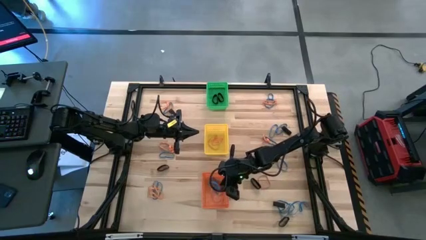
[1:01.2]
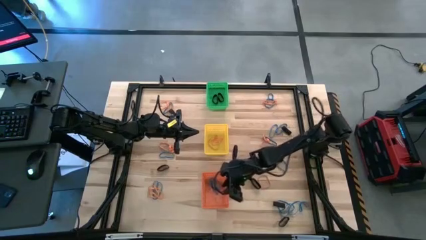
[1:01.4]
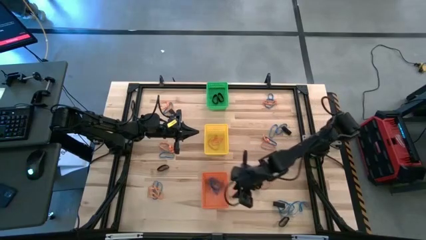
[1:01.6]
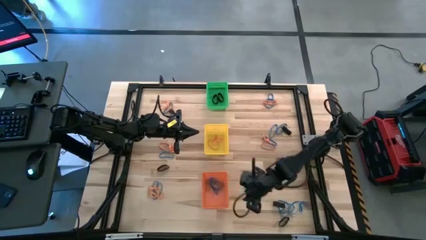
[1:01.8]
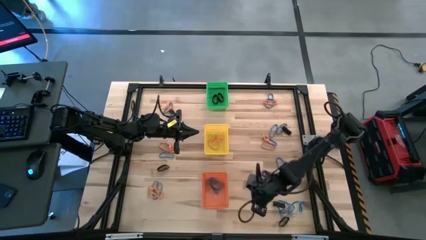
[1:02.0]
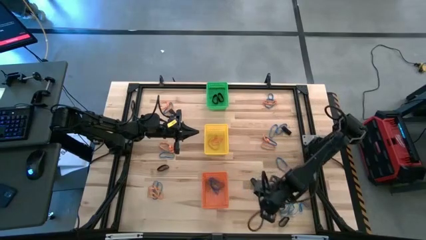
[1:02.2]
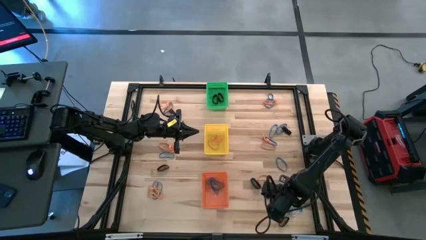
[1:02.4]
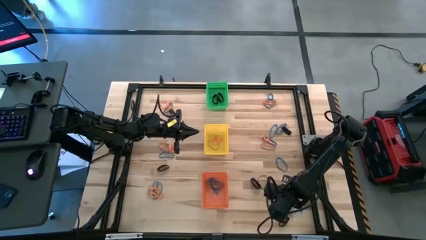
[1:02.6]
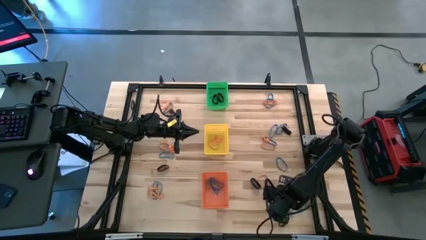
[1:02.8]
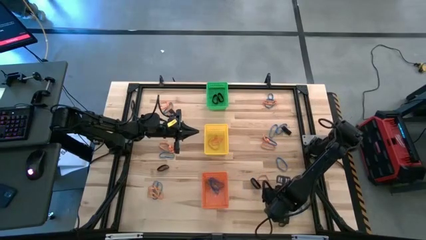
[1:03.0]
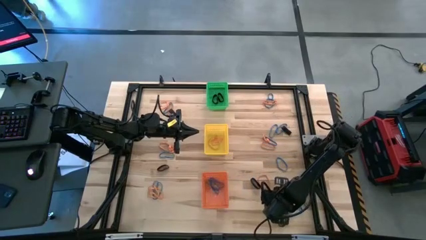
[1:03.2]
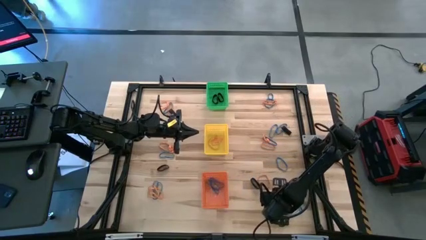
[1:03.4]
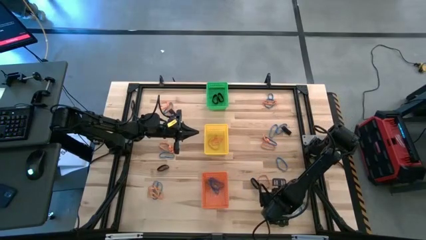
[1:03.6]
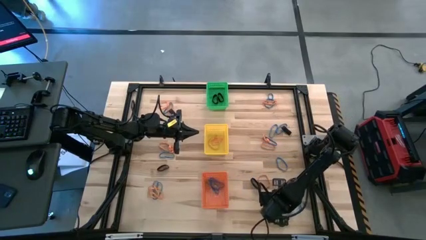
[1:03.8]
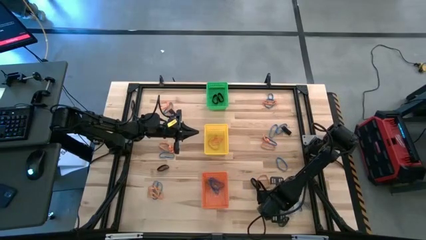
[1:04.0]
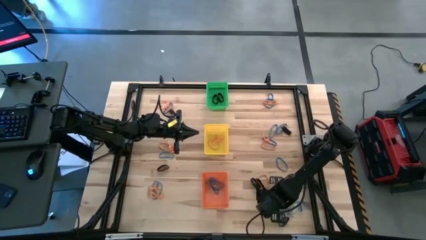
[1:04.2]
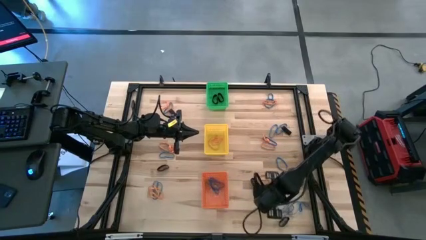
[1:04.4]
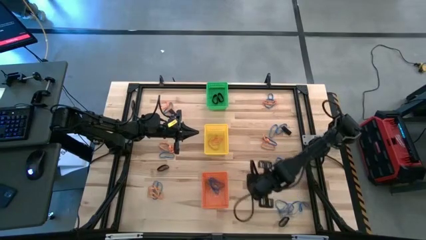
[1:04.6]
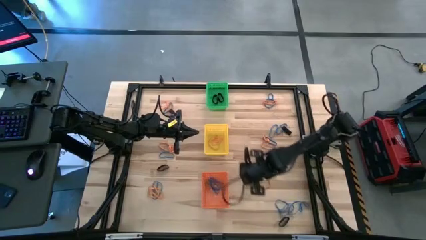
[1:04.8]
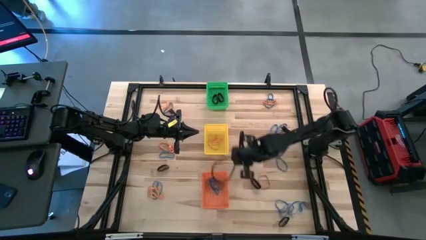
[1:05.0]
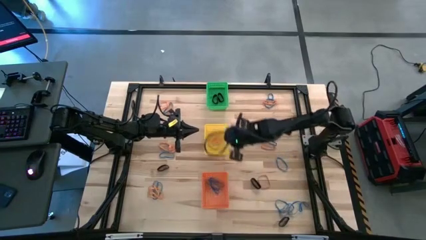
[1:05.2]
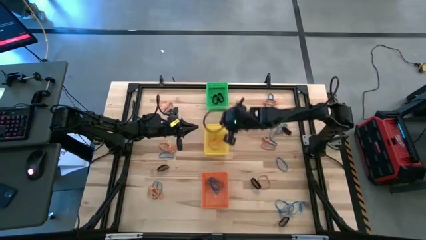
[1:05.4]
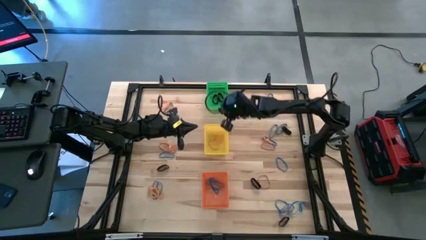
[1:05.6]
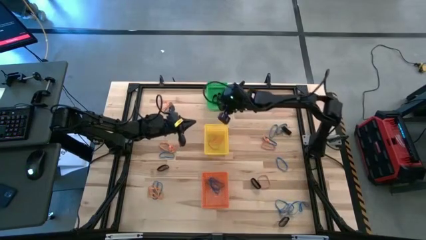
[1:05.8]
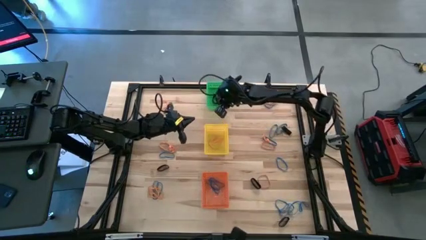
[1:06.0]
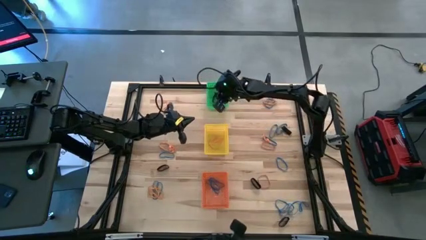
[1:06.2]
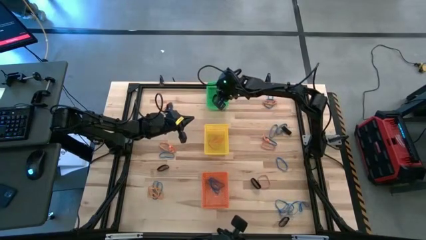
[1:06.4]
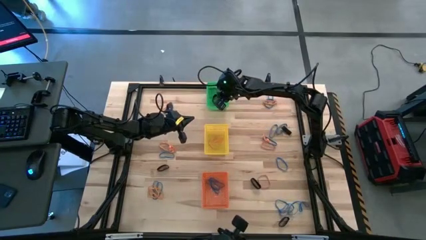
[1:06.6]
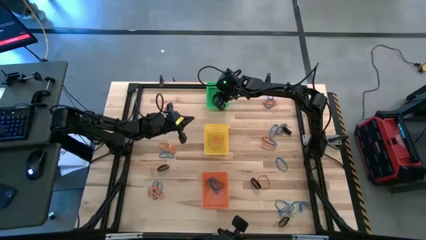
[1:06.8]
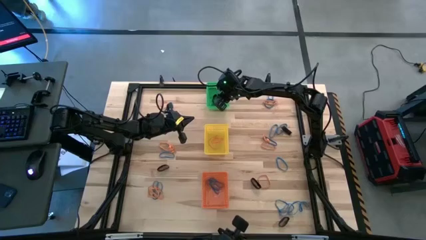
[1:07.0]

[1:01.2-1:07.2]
Task: Sort rubber bands into baskets
Put the black rubber band into the green bin

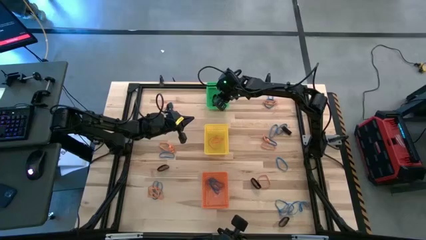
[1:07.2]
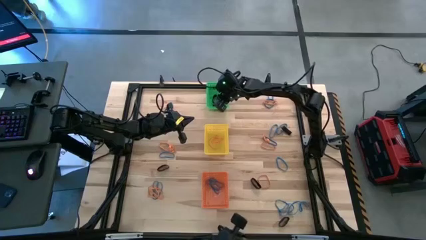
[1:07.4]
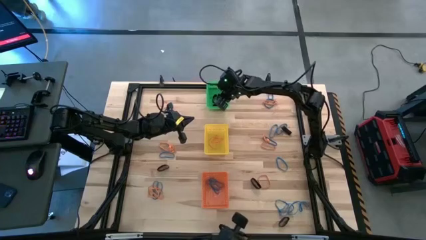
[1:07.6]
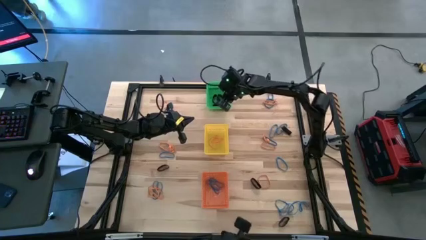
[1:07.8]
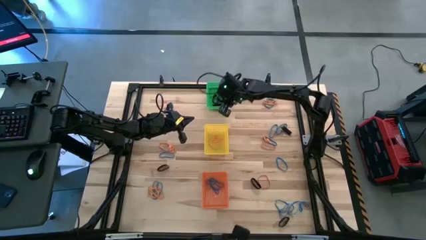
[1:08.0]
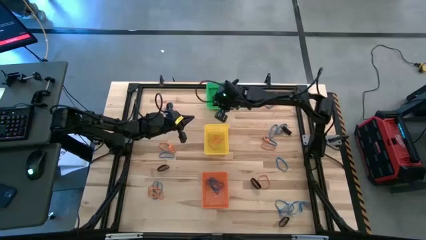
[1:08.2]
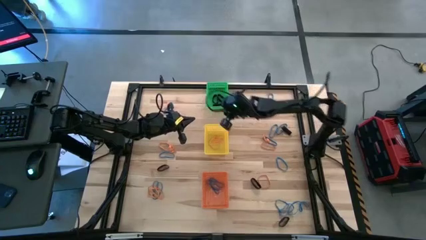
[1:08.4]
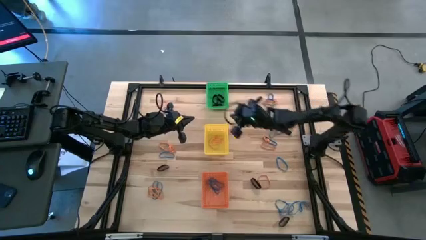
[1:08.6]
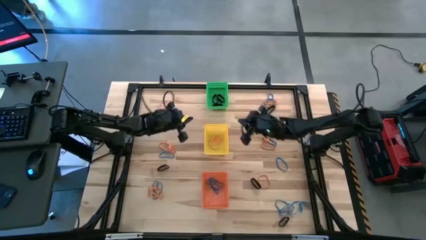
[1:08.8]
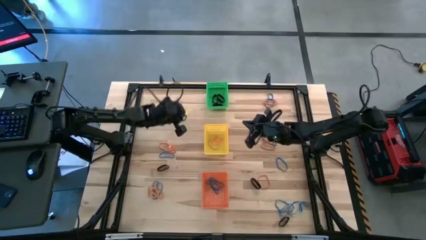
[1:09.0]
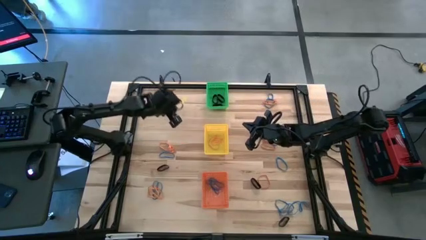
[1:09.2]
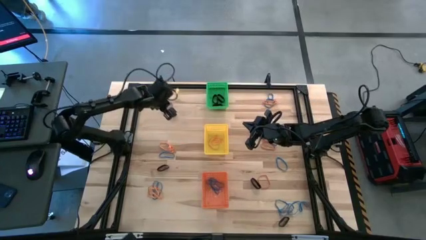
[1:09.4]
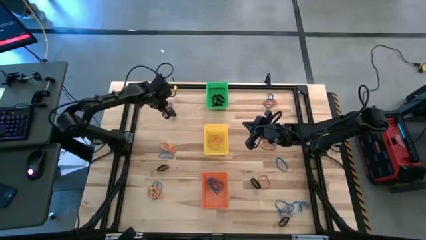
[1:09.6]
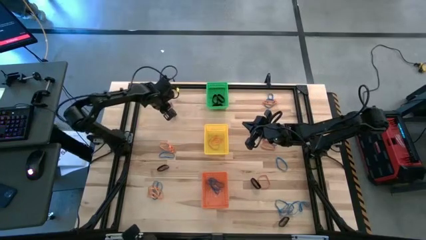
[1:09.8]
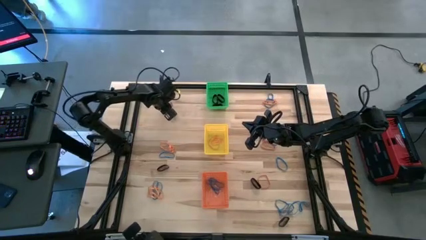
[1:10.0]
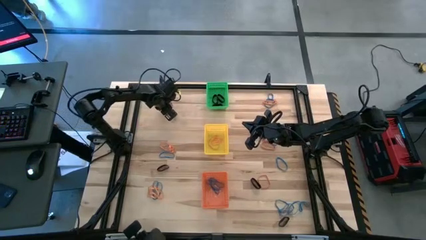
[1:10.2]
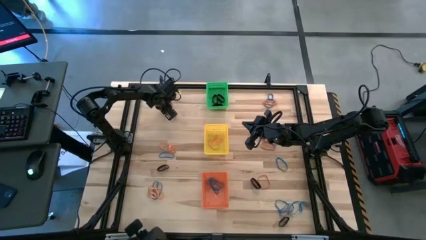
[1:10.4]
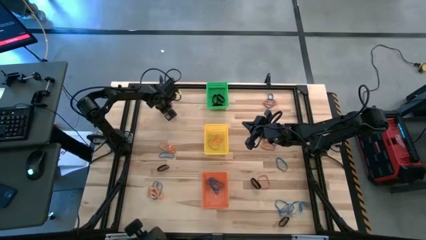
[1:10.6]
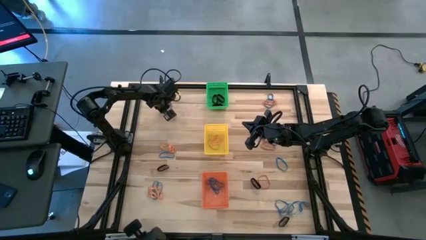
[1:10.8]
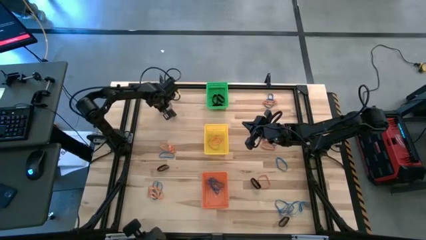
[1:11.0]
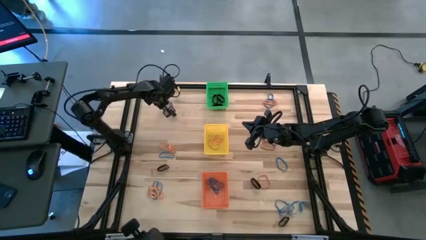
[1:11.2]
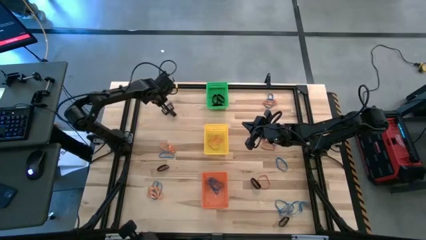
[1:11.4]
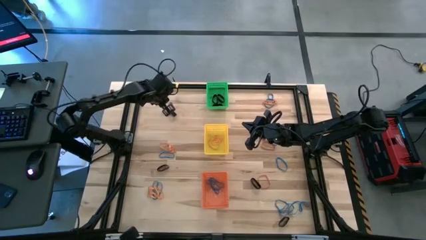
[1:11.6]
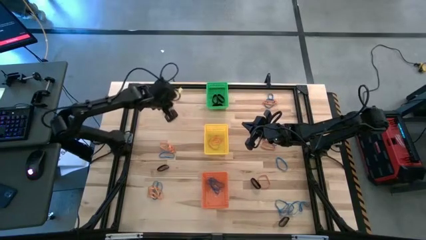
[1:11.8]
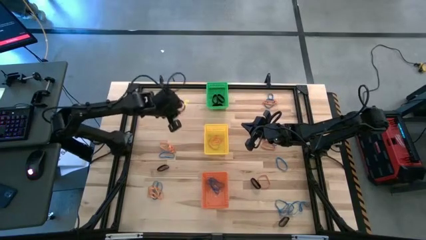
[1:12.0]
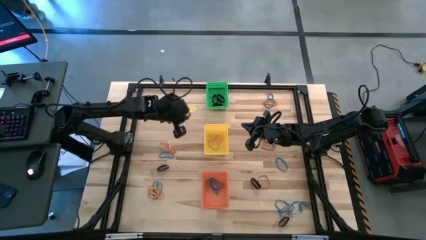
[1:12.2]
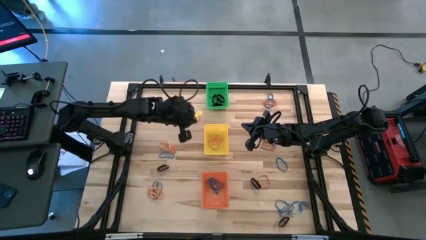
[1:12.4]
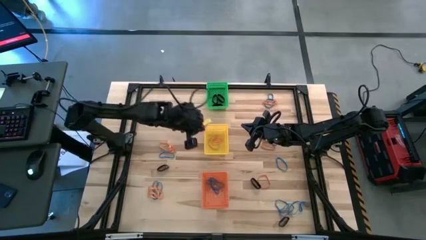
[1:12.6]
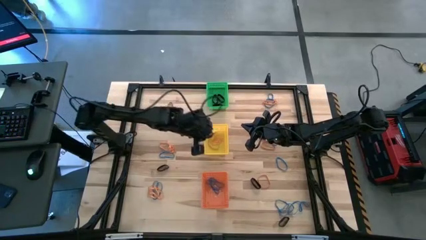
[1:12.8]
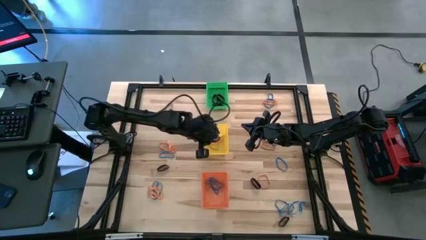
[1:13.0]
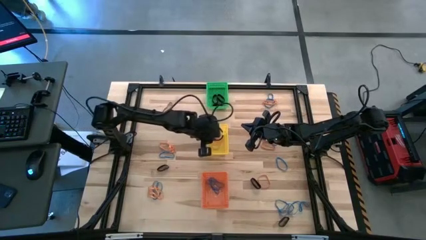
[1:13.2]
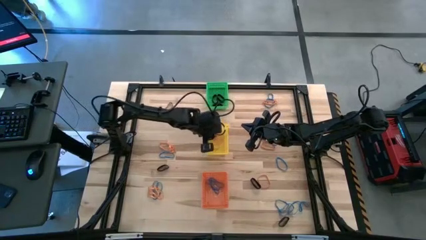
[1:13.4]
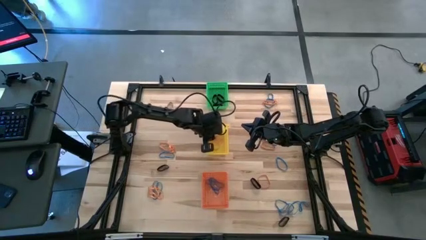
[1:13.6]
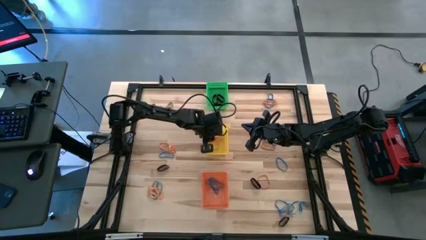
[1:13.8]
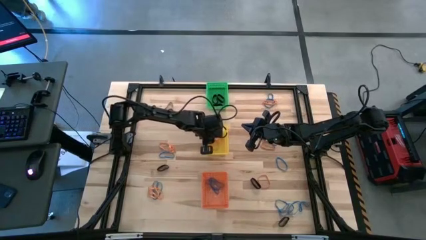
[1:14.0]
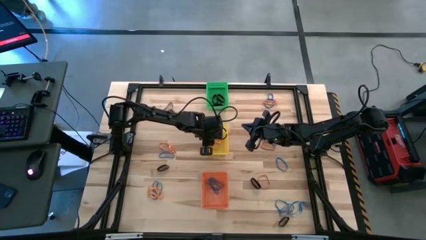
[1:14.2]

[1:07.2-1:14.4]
Put the orange rubber band into the yellow bin

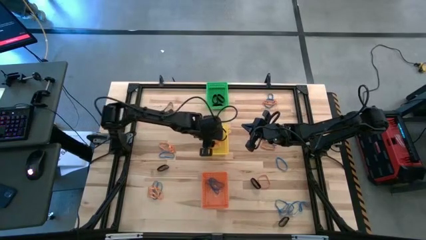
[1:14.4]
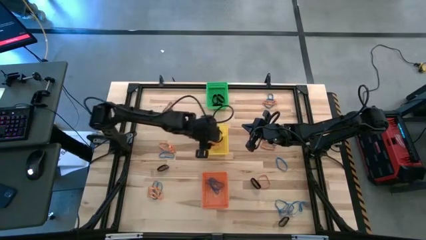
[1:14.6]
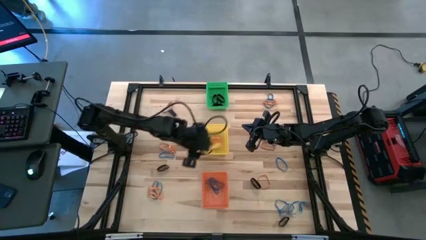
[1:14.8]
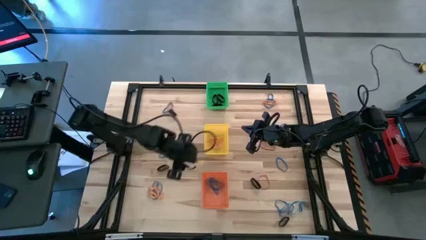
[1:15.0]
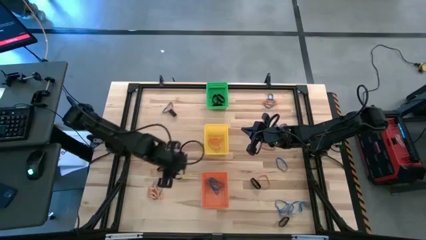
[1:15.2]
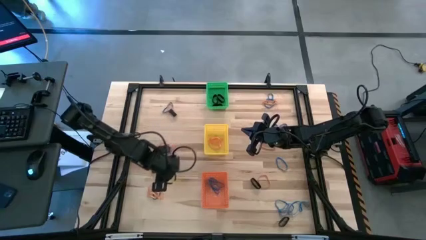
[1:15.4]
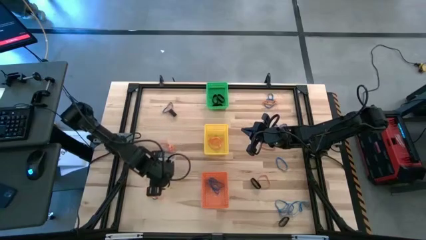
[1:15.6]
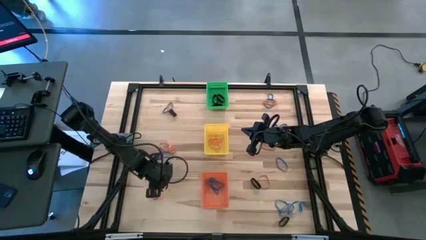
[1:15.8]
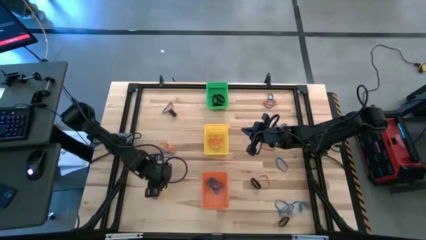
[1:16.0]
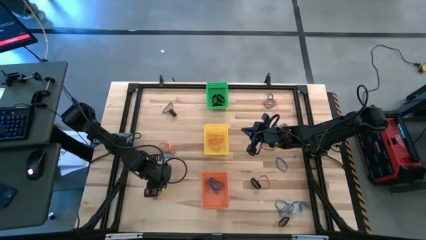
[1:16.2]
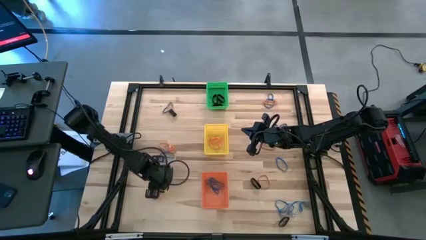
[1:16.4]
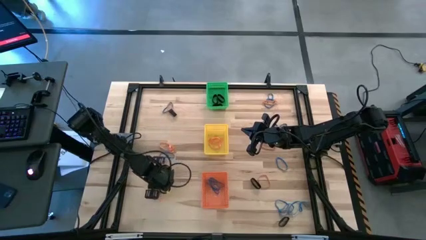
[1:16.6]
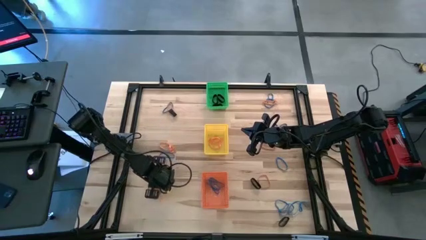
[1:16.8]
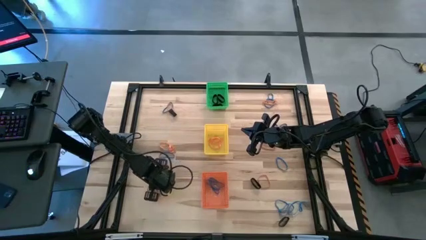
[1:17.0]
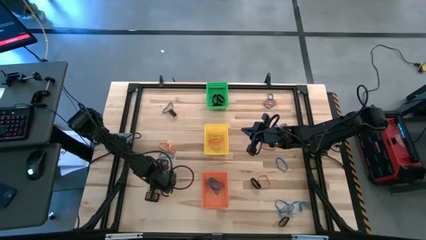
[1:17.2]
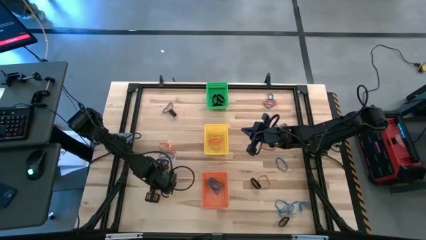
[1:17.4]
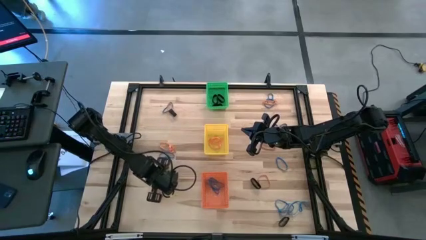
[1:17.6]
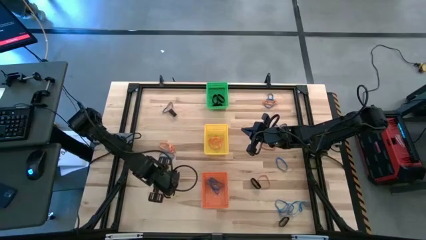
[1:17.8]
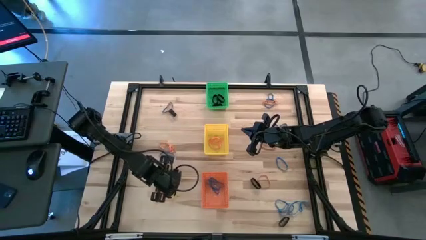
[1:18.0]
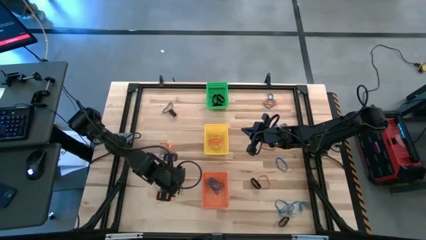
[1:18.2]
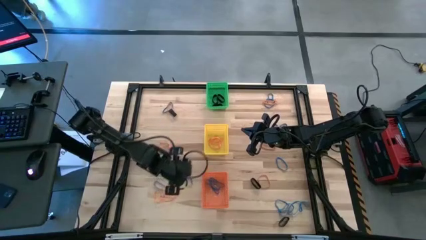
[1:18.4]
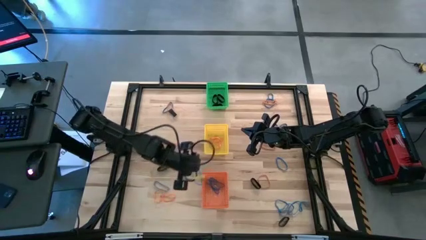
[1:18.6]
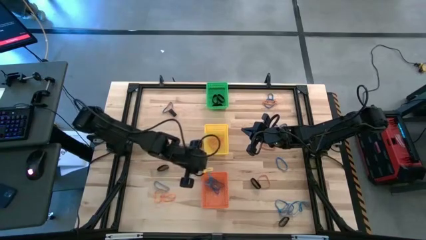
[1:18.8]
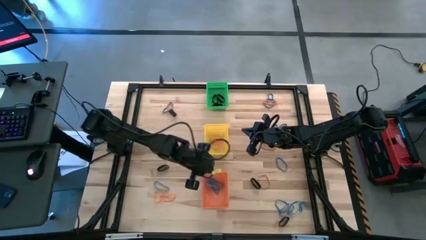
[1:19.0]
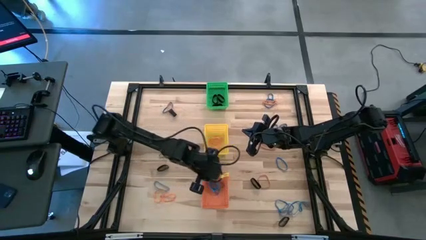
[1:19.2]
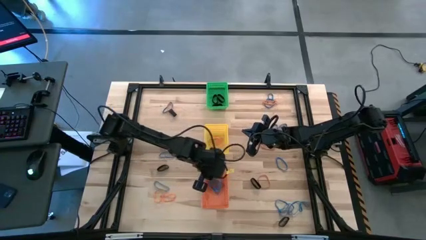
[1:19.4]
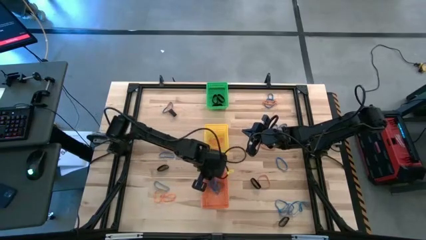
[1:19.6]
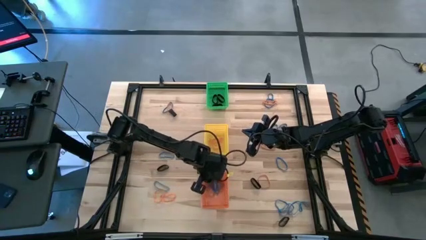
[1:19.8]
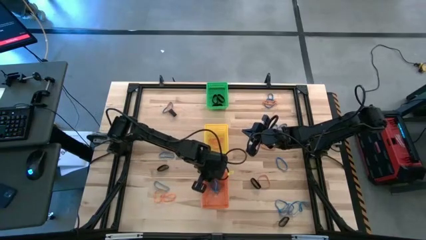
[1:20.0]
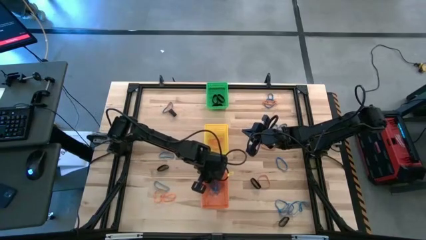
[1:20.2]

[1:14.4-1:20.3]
Put the blue rubber band into the orange bin
